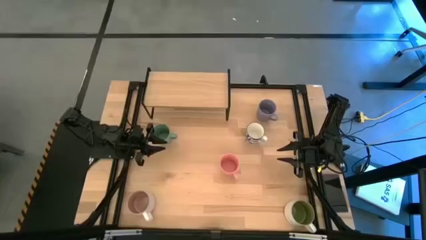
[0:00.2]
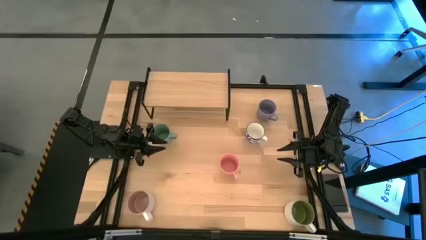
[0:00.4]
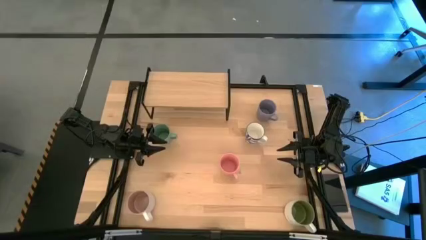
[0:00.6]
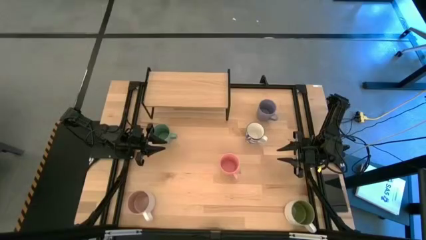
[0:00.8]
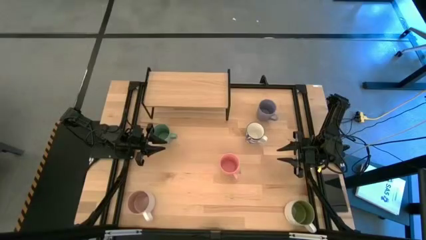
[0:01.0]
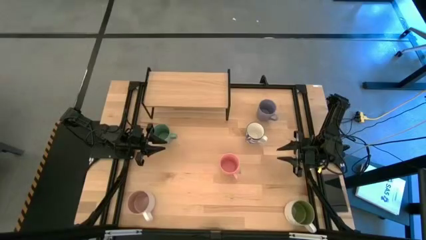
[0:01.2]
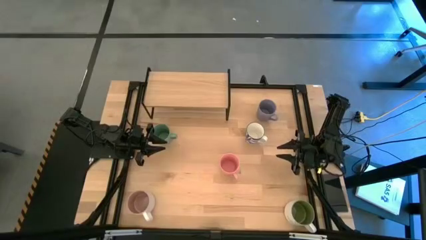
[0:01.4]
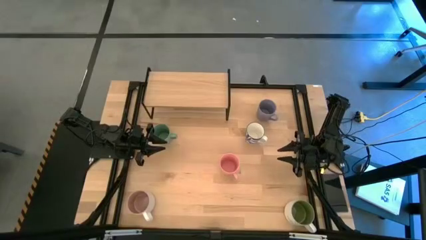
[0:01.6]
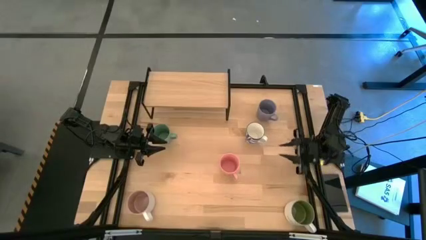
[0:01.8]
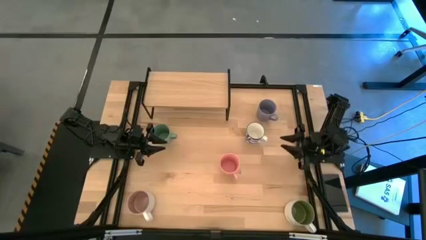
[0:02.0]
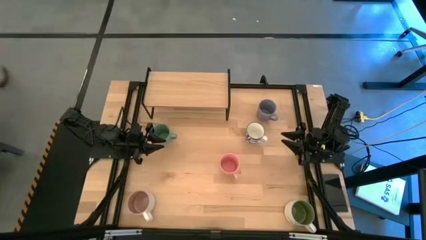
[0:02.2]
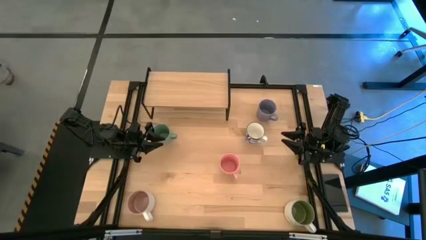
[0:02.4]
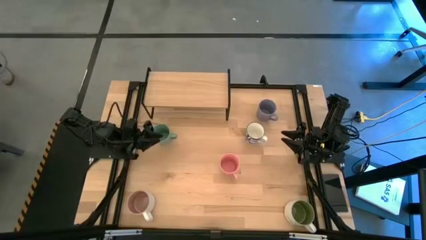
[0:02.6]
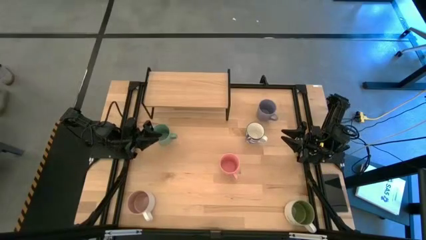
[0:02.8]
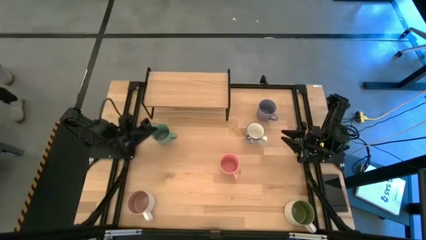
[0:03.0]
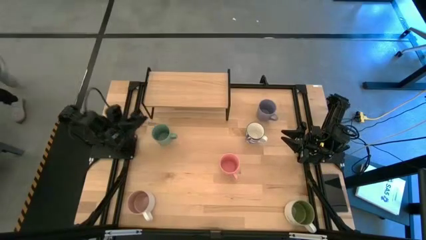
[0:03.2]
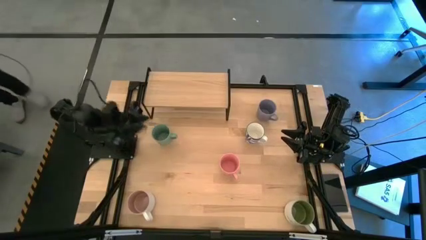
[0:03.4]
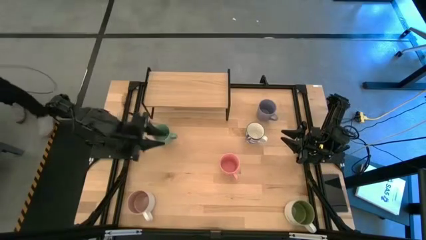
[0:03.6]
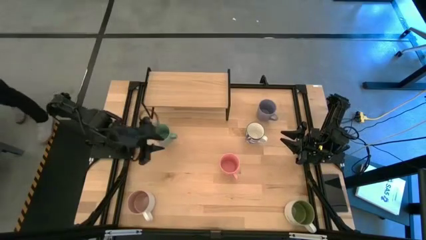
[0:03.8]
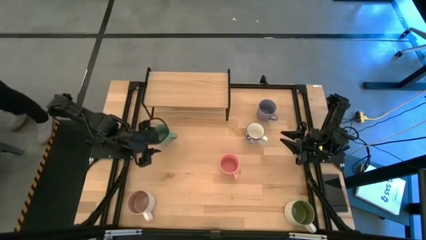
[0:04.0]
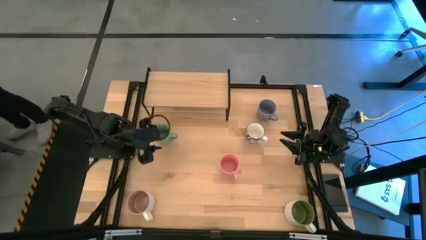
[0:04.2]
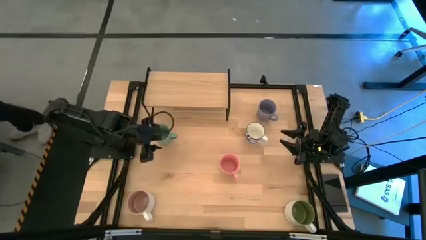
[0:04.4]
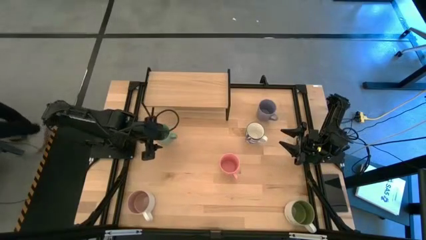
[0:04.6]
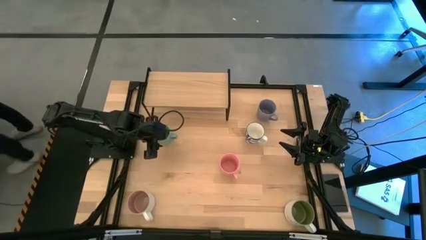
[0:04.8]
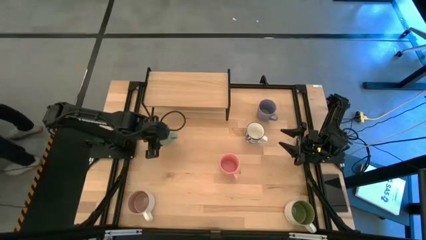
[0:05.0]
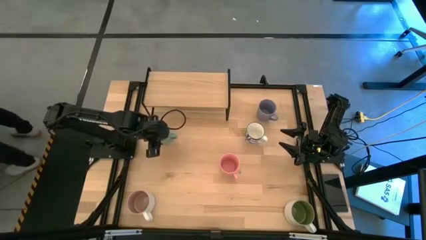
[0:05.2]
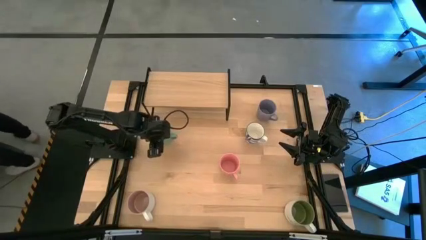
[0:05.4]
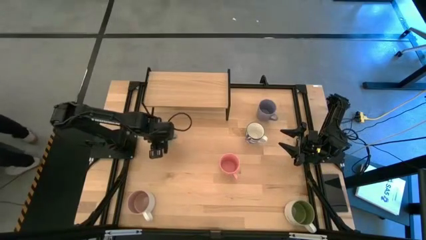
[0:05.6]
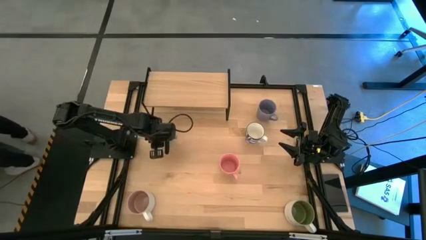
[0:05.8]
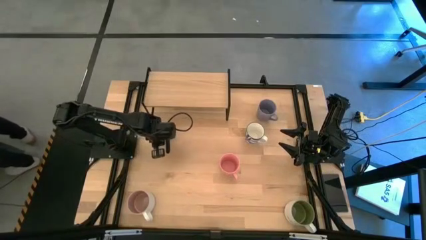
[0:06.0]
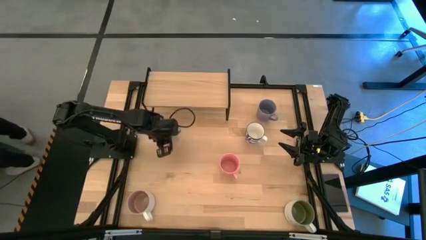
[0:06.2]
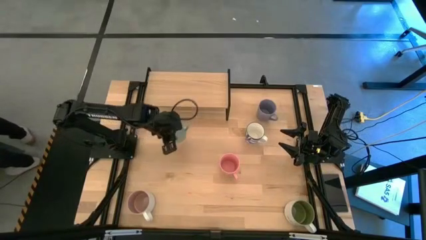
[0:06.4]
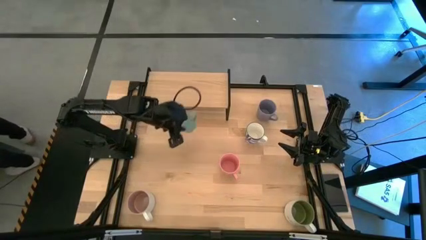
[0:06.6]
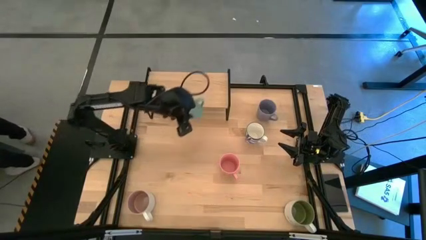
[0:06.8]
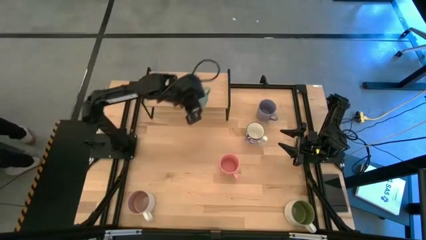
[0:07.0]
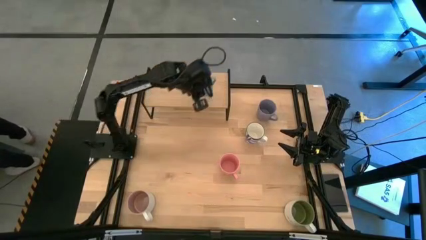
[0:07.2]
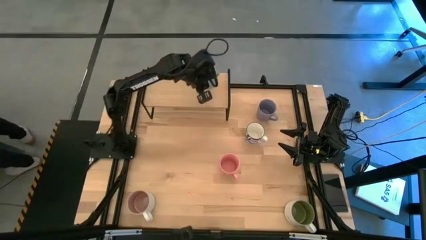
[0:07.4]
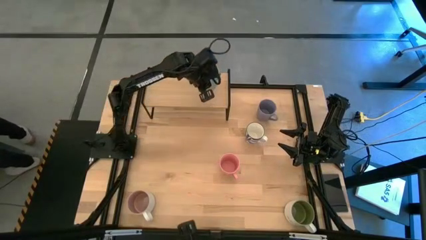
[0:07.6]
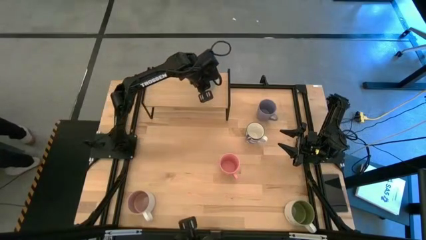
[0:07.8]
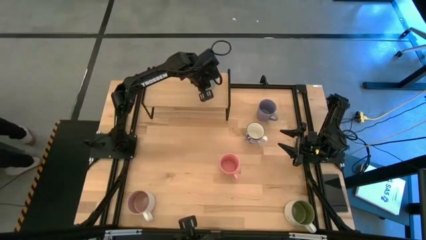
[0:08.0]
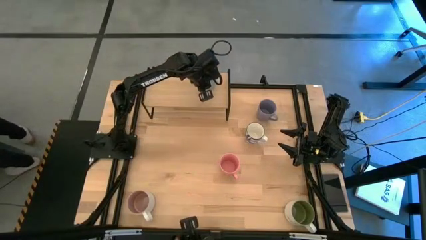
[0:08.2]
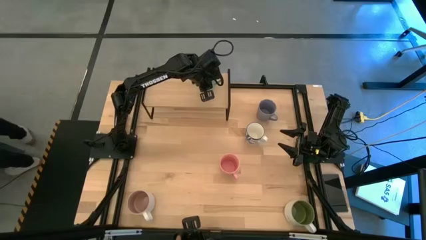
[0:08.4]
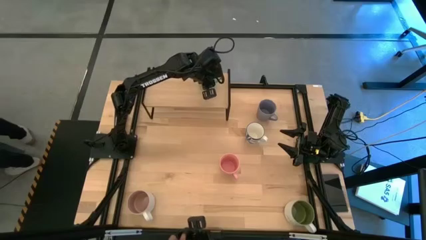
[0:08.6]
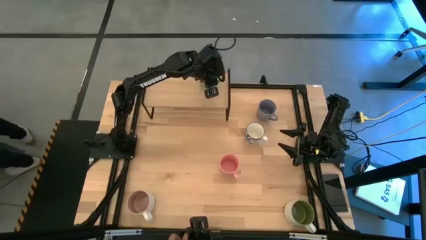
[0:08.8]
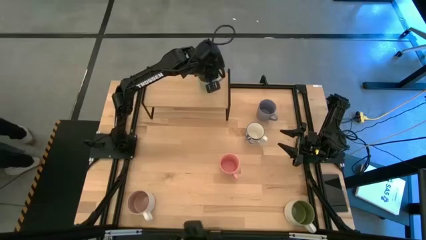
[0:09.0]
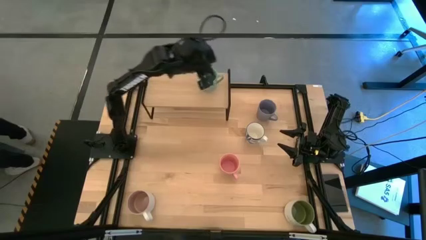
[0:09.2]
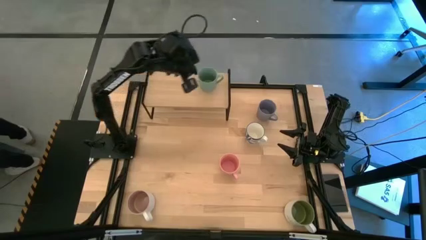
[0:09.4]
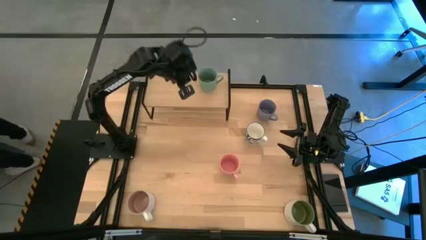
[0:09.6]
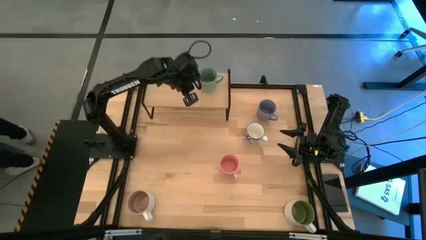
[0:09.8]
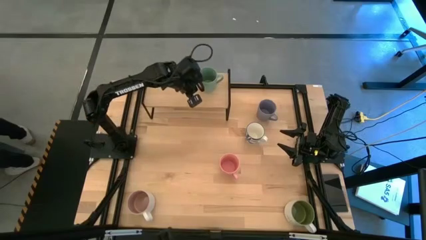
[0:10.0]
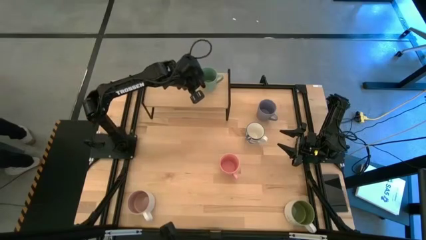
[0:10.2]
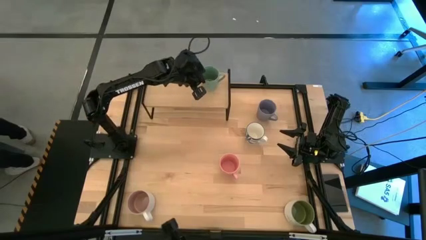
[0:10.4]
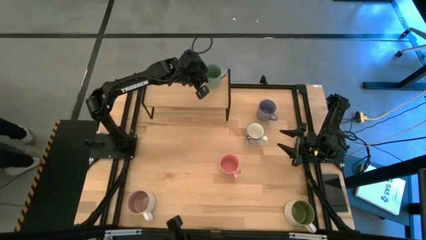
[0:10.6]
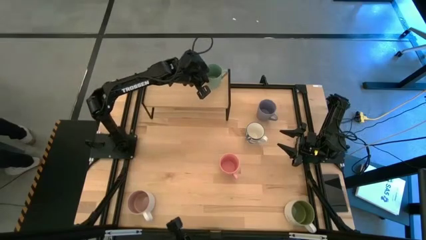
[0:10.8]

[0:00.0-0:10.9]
Task: Place coffee mugs
Put the light blue mug on the shelf
